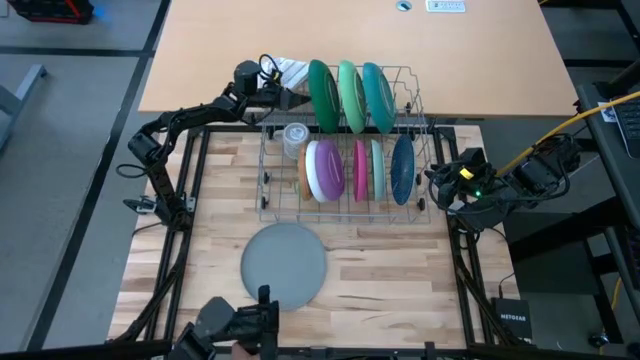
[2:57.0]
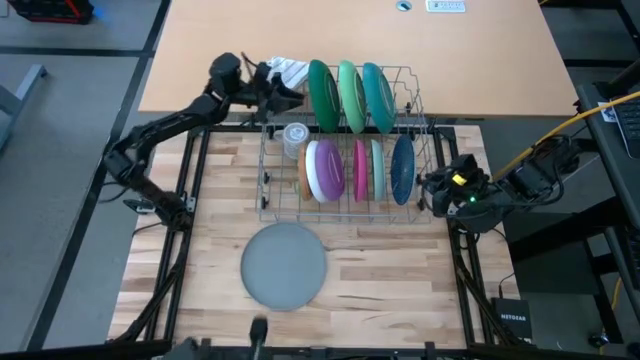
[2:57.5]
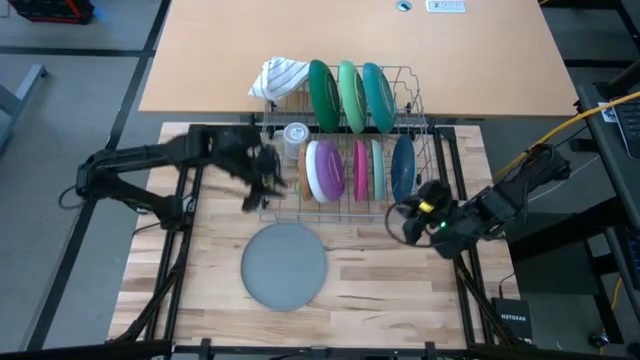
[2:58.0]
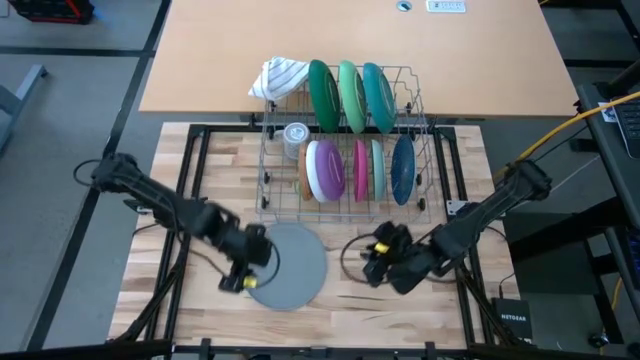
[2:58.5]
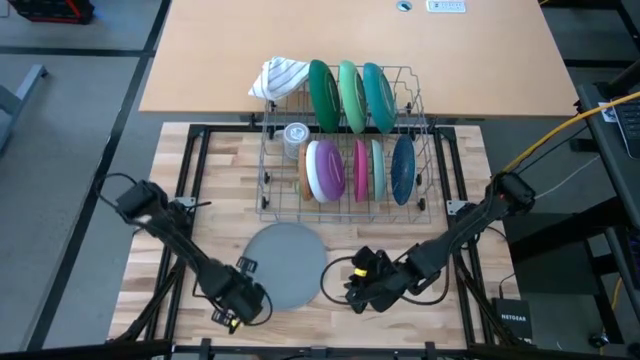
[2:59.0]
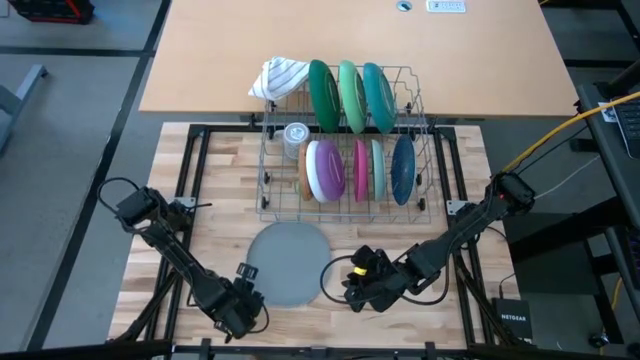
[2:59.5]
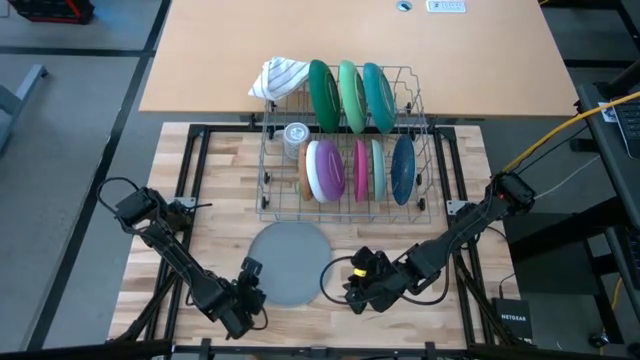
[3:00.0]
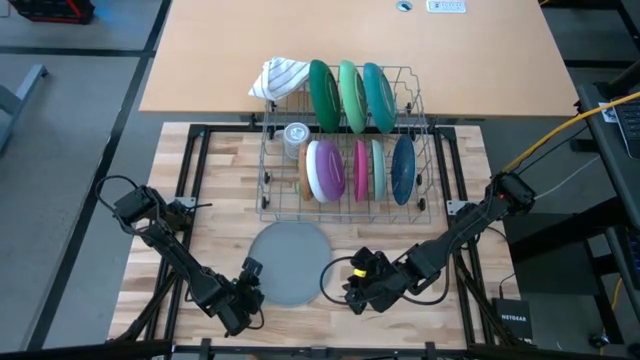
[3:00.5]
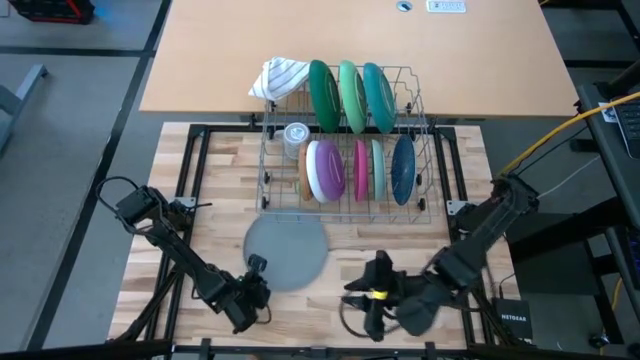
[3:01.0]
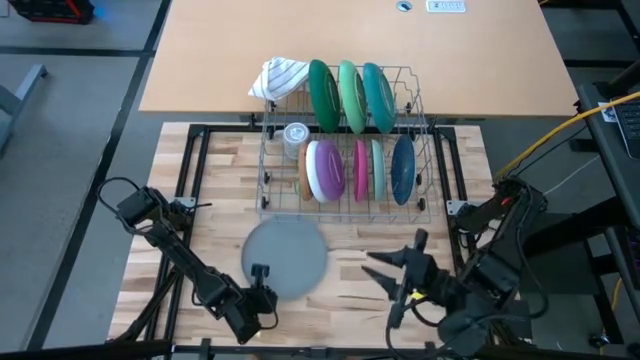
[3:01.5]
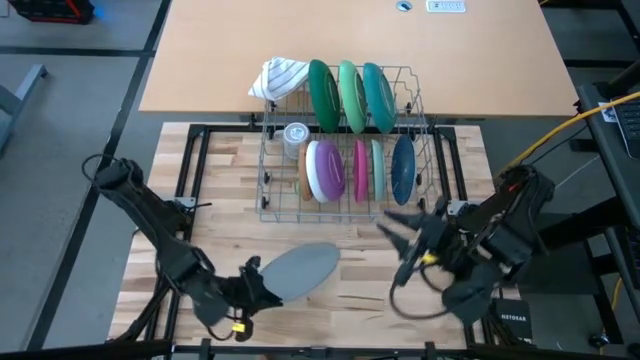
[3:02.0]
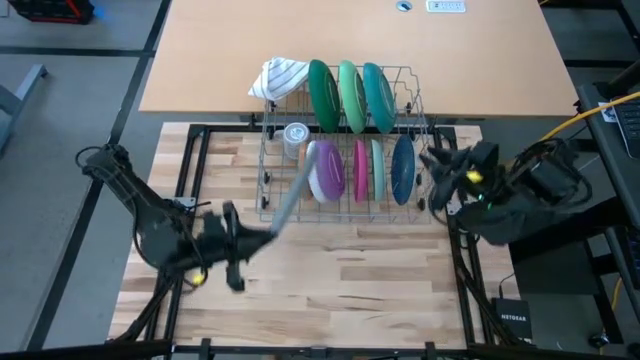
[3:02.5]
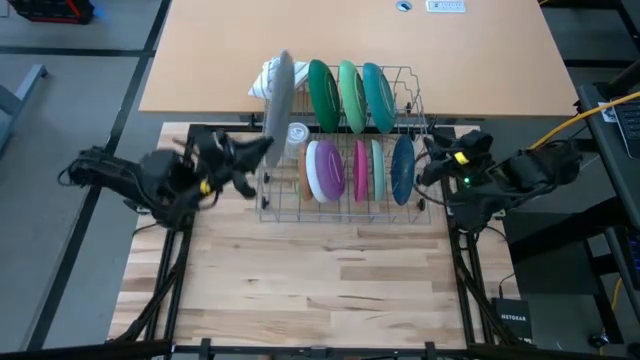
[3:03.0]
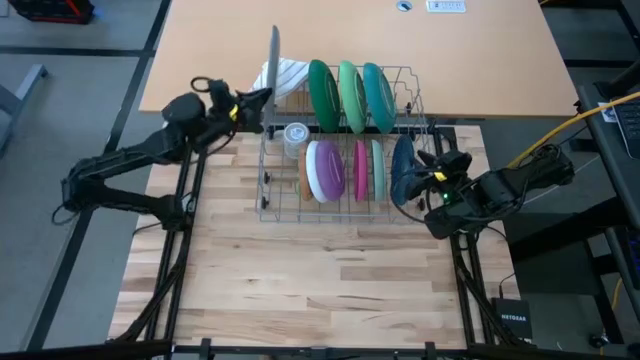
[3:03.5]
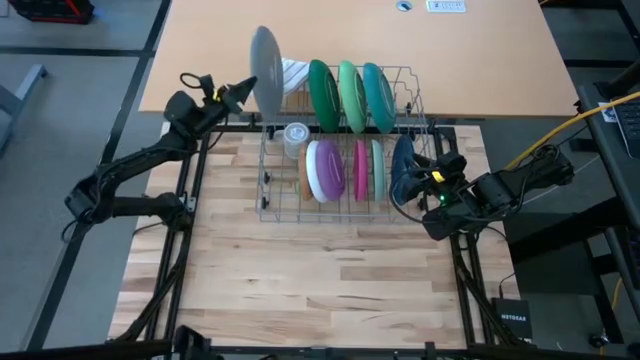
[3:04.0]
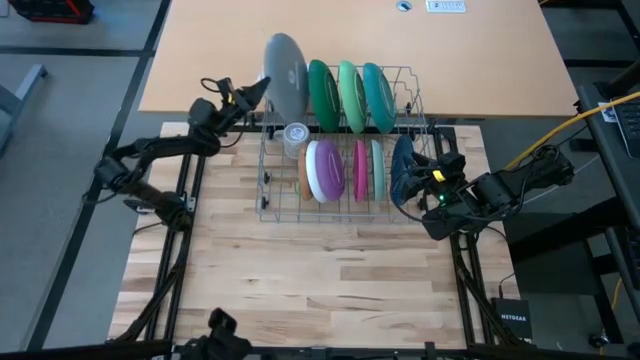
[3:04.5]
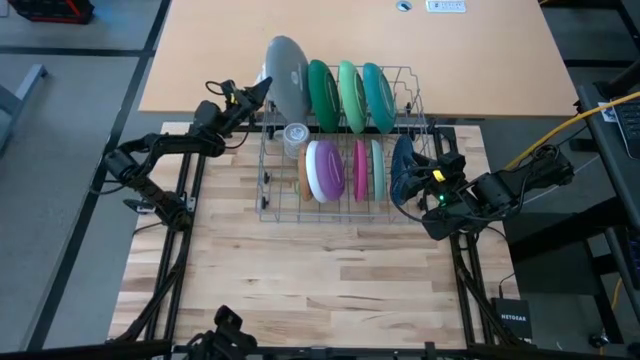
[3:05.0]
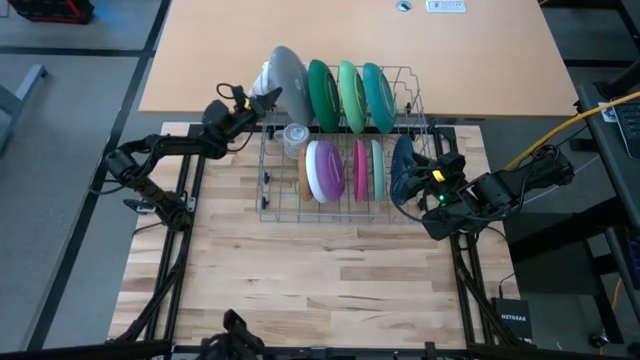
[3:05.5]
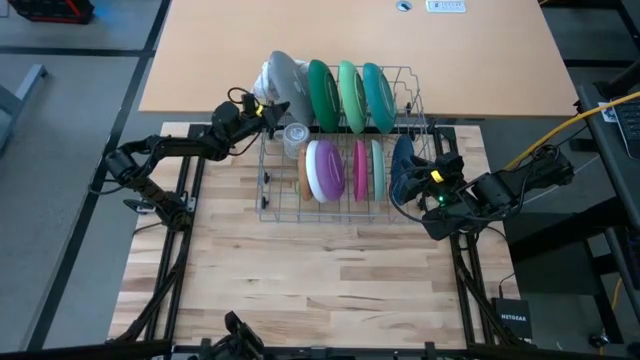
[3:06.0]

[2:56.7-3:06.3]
Task: Sort dishes
Put the gray plate in the dishwasher rack

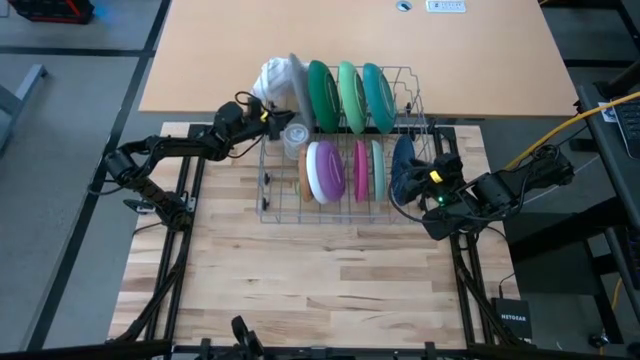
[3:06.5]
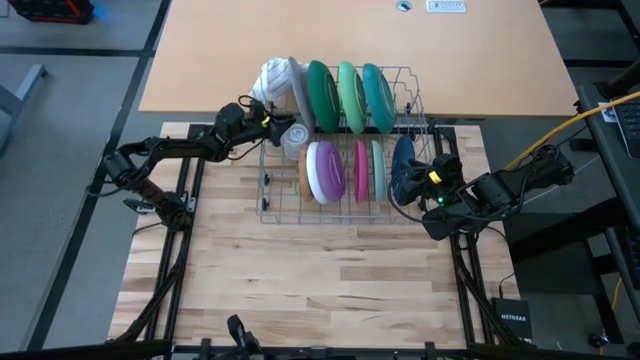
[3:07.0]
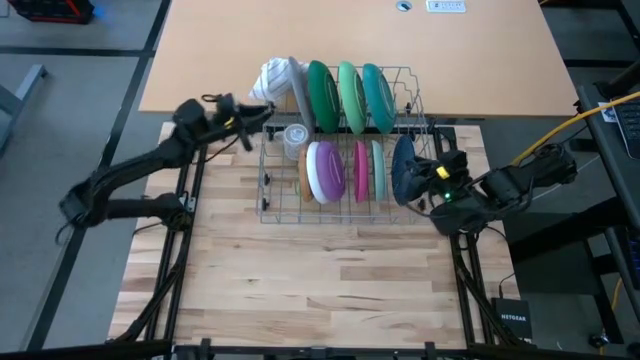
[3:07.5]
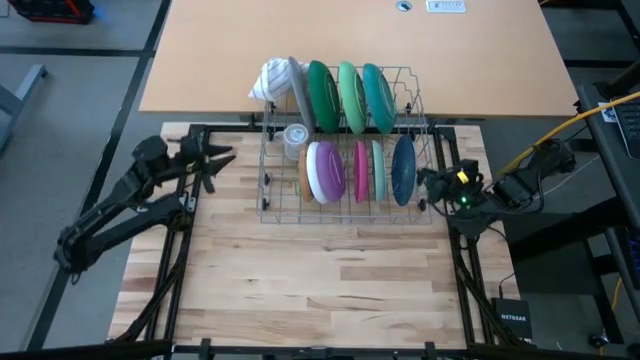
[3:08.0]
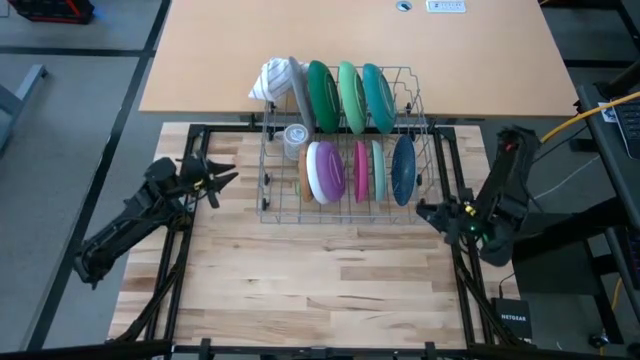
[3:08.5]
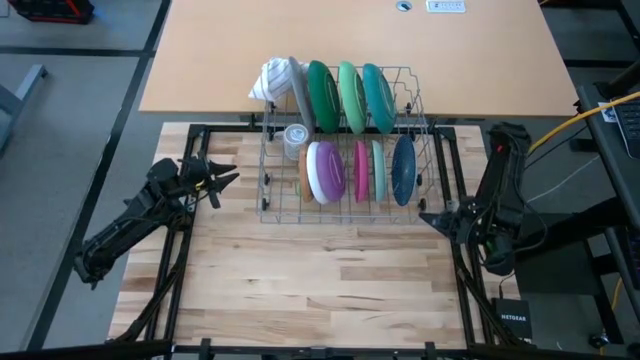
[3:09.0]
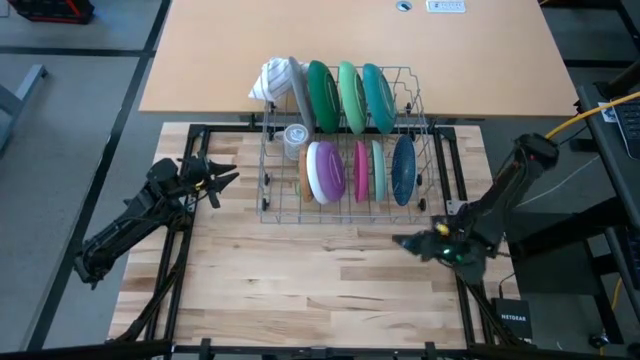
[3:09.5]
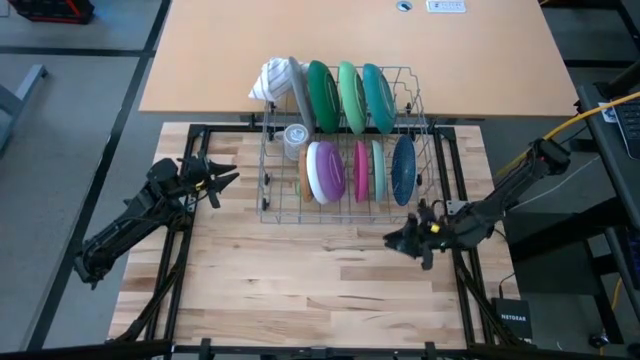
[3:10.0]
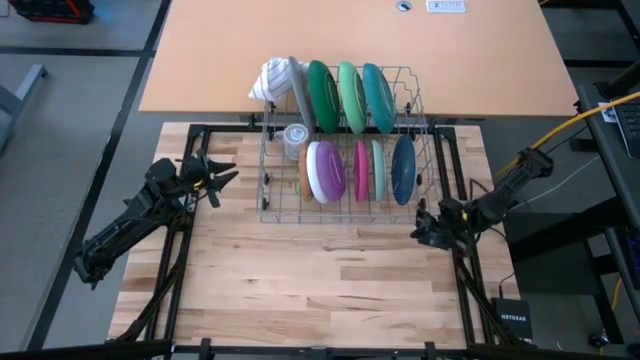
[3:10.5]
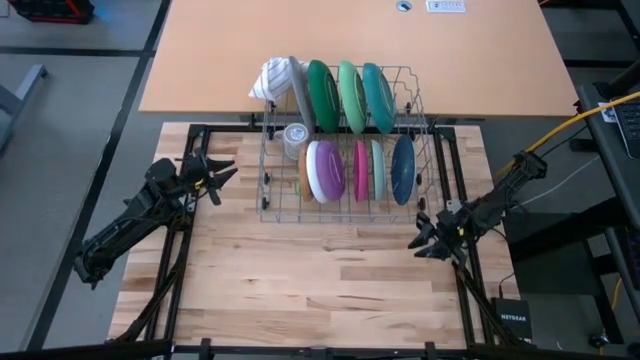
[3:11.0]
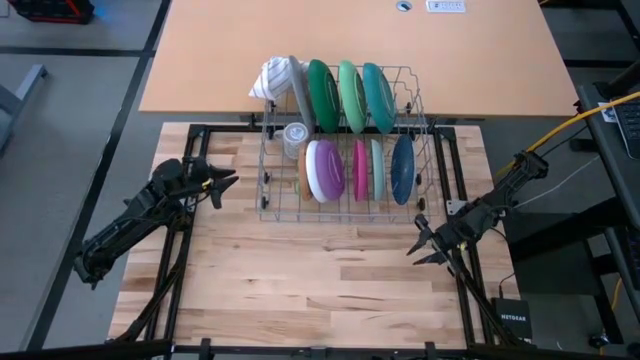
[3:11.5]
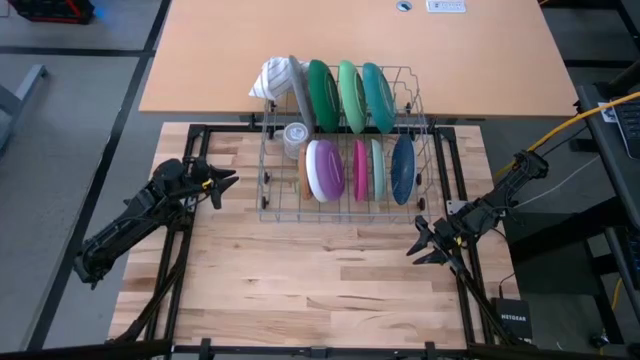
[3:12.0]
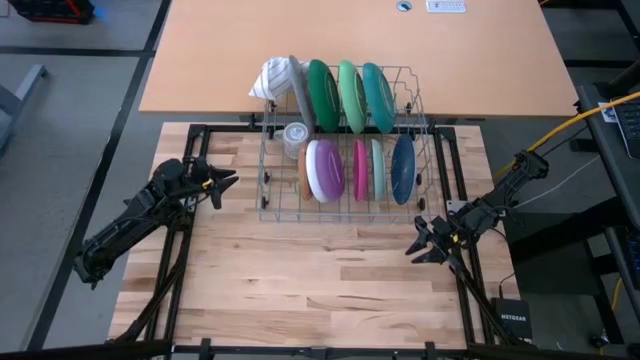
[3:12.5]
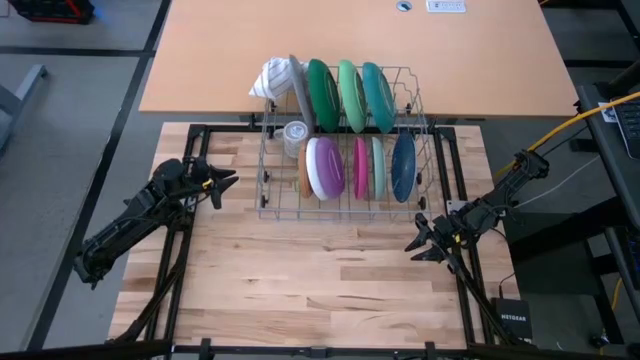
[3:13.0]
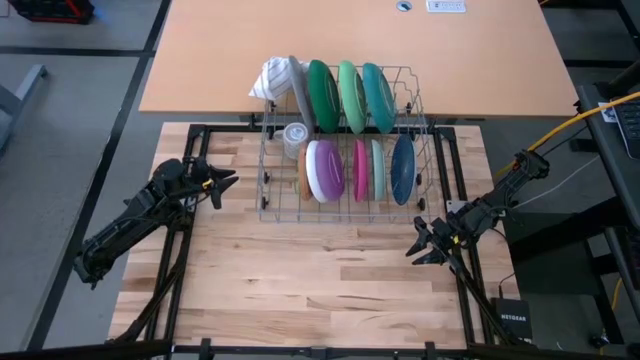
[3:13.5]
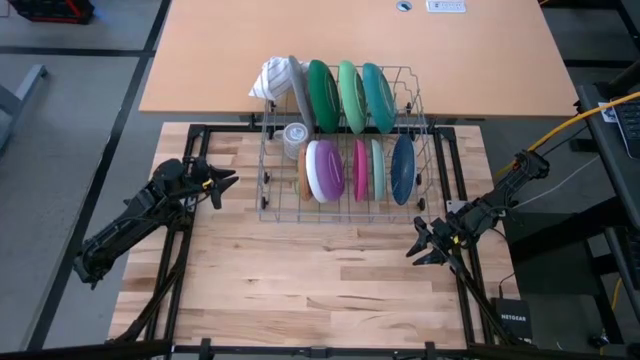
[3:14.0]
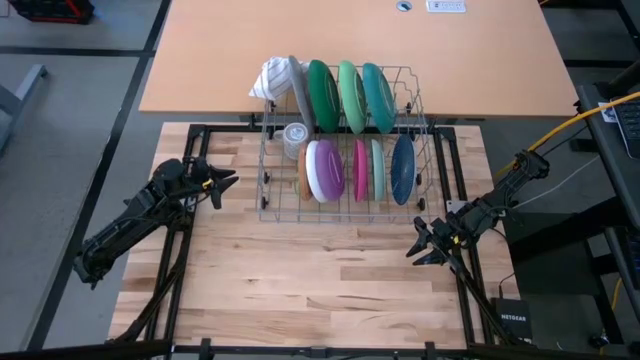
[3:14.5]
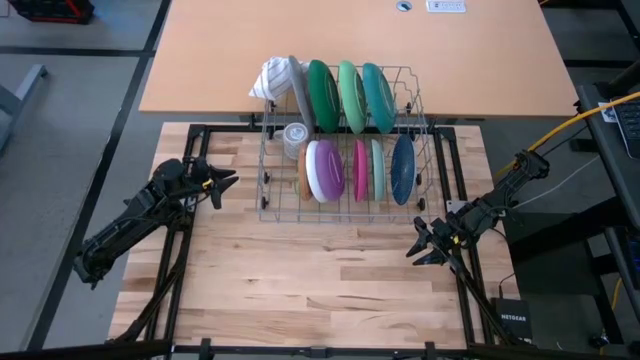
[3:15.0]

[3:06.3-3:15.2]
Return to Home Position
